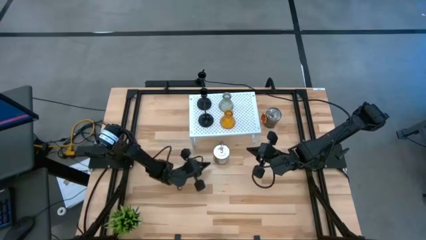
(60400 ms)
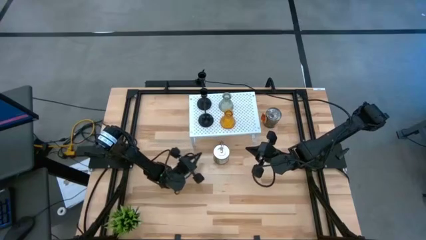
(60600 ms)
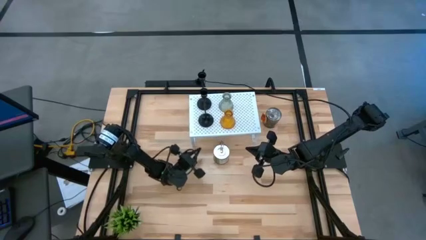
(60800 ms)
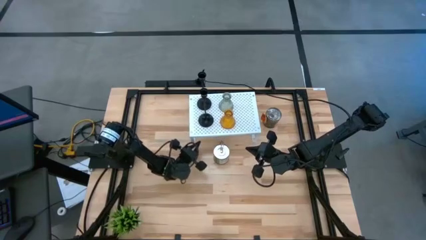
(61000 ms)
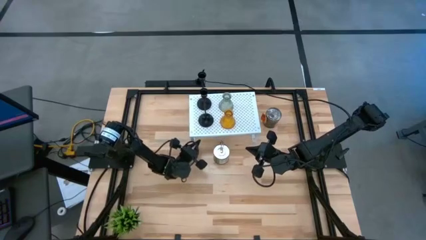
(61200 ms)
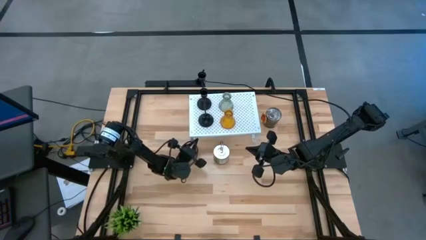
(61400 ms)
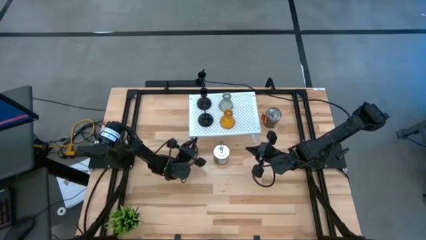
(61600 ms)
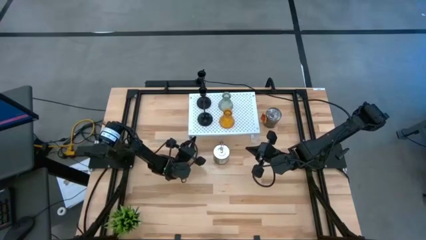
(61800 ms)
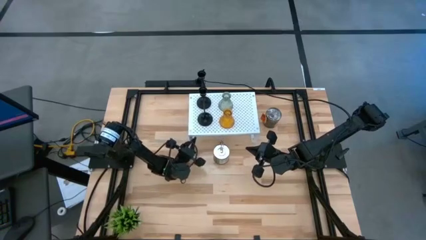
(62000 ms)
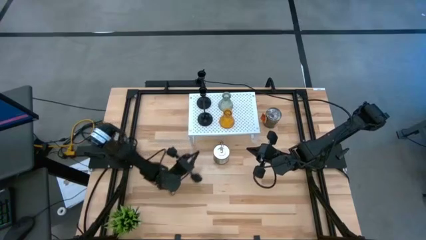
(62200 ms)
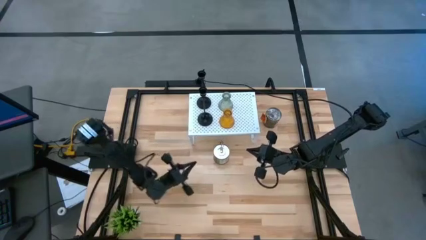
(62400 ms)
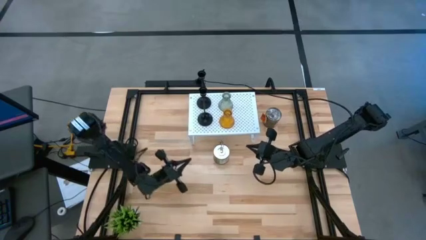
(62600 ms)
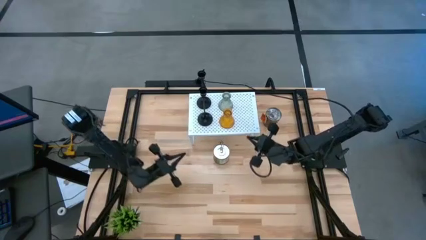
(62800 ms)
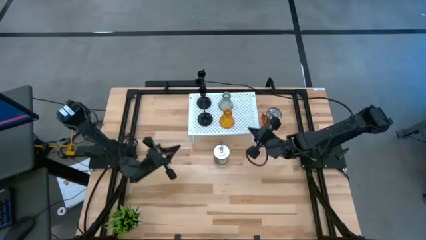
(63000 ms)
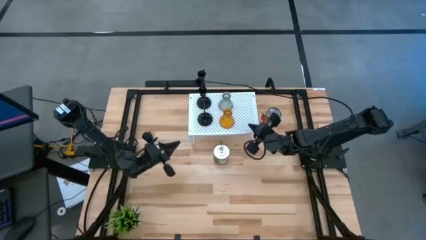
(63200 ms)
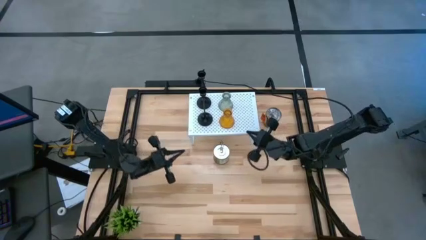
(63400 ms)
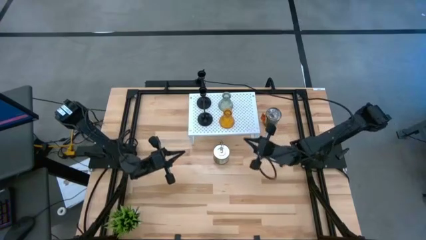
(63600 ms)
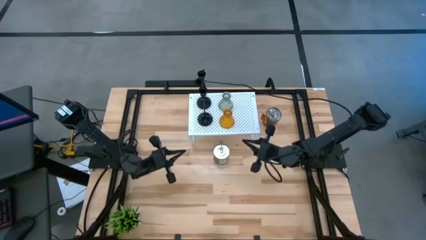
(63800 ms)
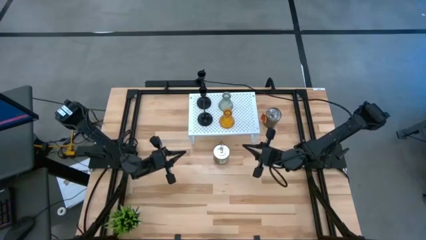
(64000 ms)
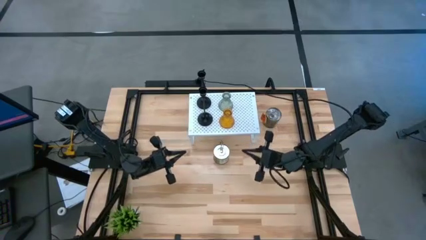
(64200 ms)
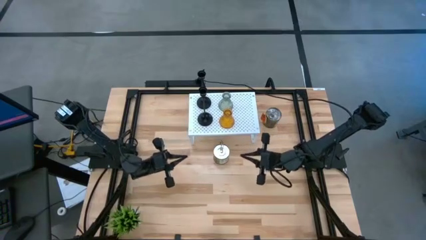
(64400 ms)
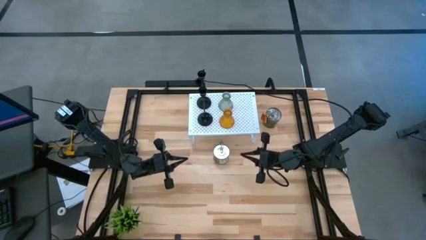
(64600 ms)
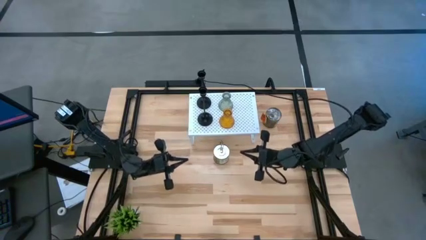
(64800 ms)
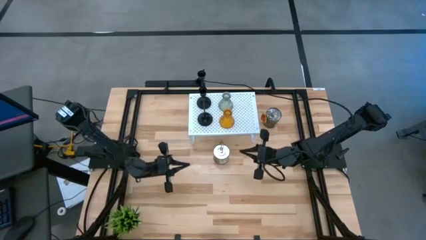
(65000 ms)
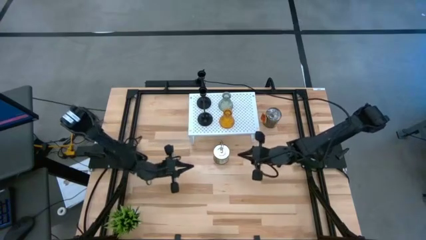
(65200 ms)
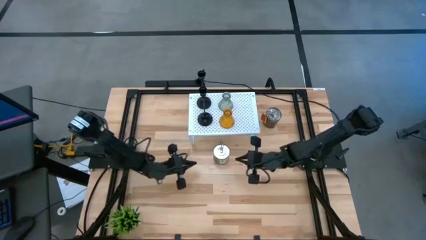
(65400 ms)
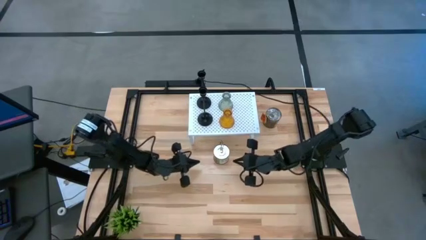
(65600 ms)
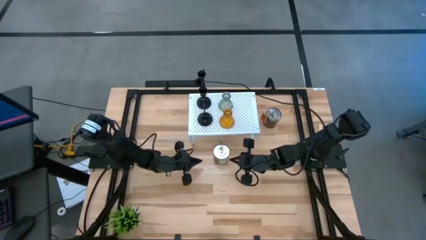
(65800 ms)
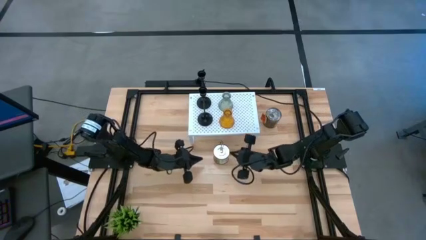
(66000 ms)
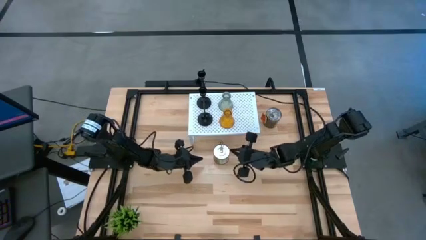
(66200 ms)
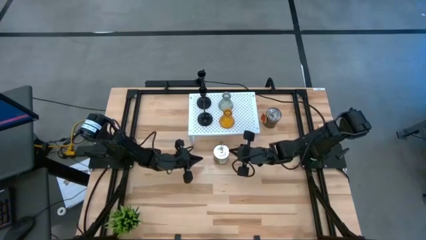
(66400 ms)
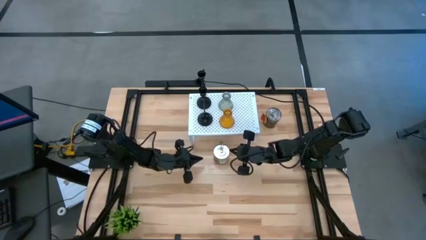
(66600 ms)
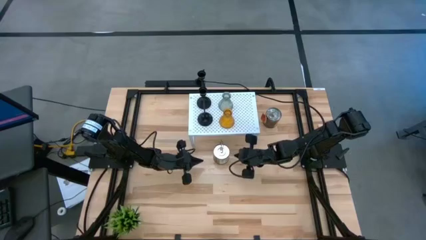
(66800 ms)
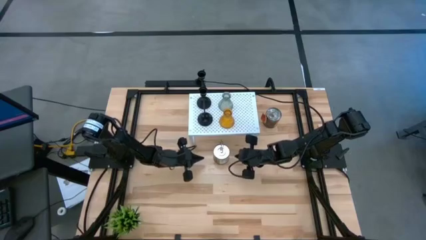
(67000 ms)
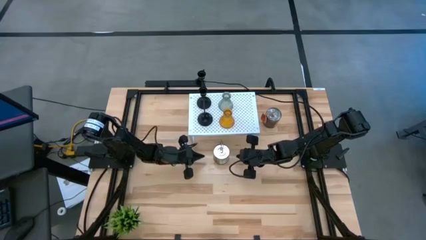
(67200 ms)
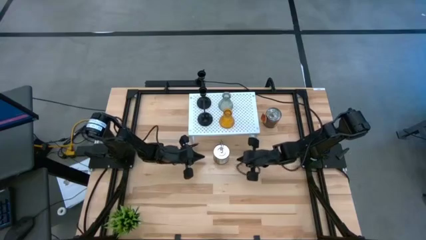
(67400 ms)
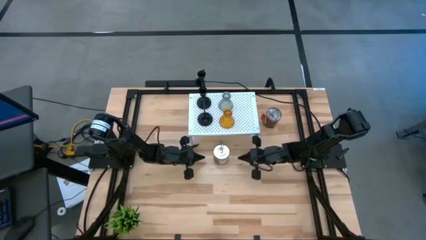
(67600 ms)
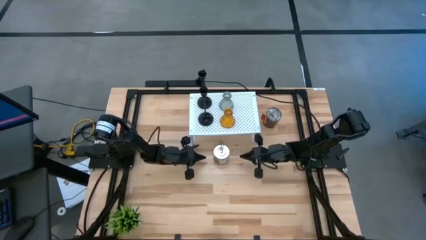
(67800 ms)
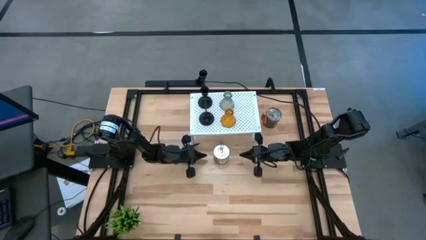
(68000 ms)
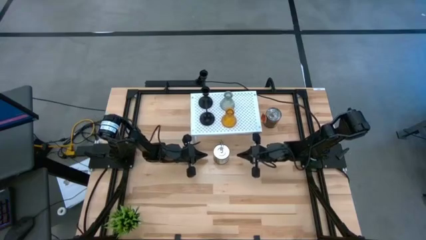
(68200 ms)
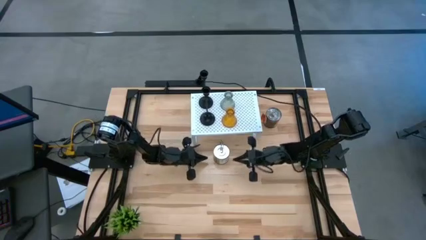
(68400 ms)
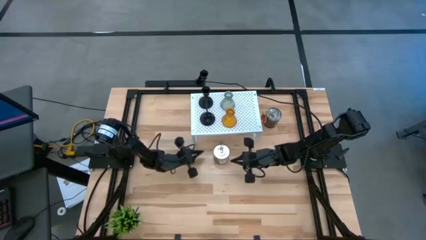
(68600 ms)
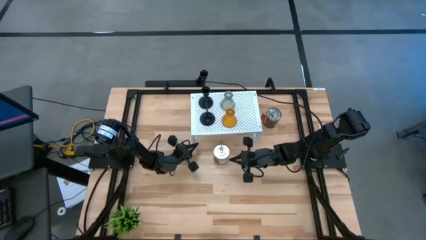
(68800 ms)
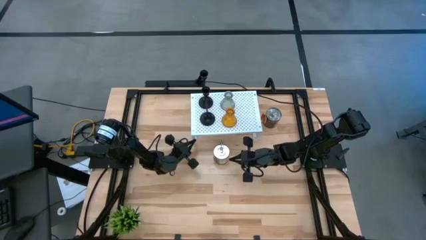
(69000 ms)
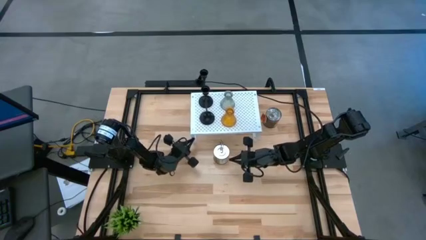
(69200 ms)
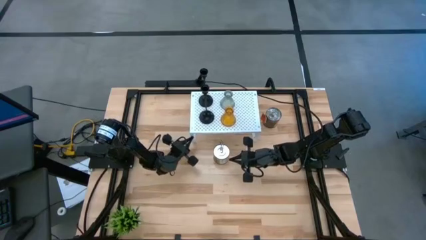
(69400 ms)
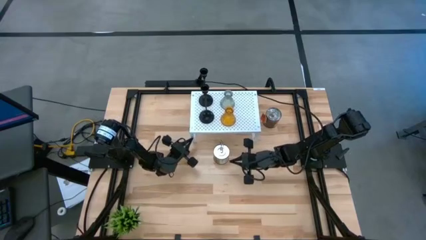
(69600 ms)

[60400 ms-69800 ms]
Task: Pick & Place candle stick holders
Adjust the shelf

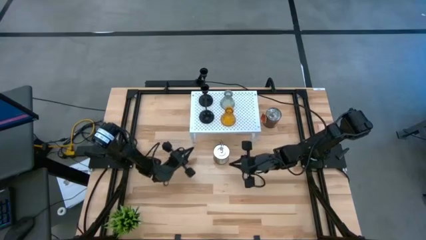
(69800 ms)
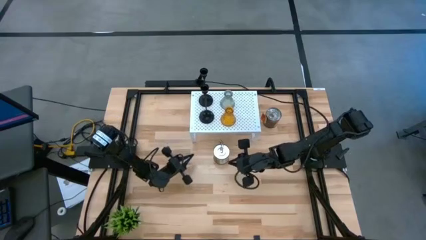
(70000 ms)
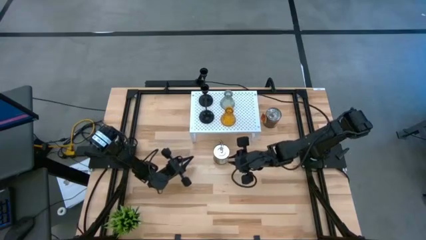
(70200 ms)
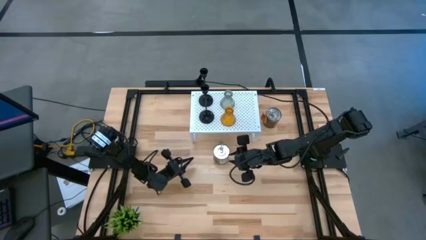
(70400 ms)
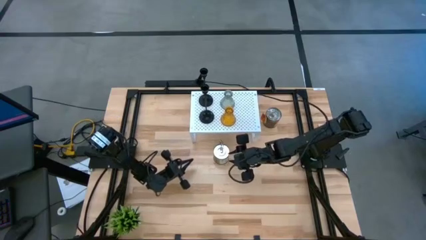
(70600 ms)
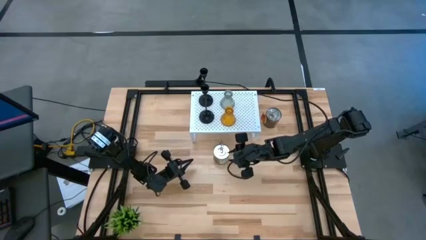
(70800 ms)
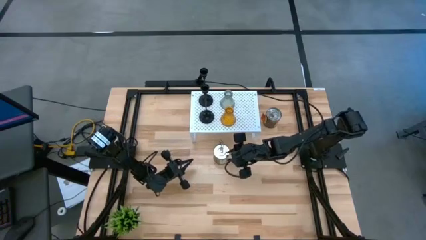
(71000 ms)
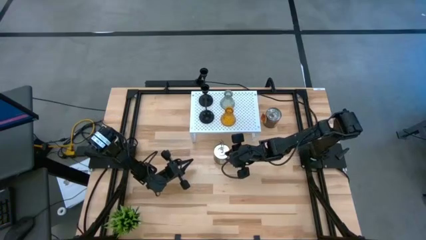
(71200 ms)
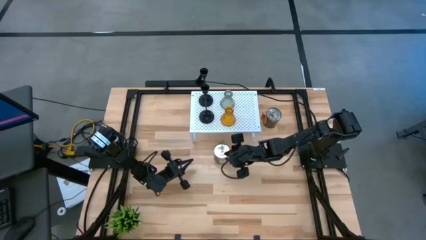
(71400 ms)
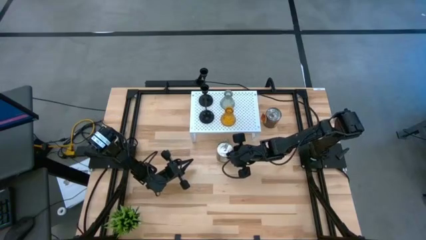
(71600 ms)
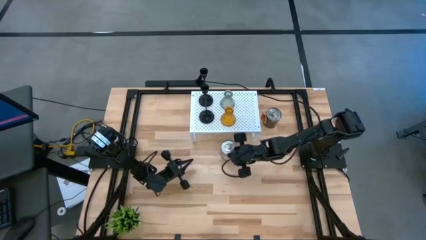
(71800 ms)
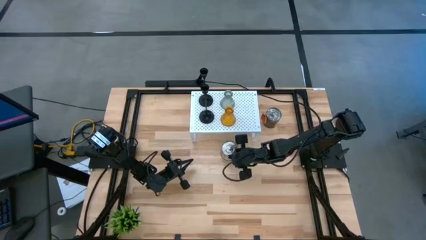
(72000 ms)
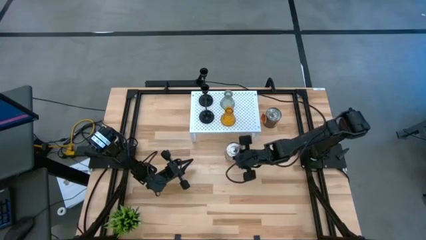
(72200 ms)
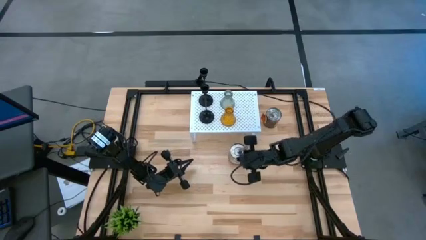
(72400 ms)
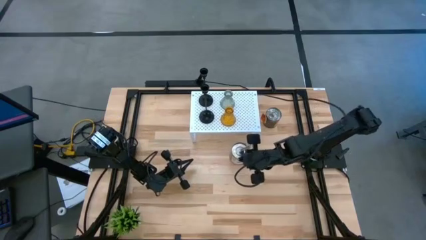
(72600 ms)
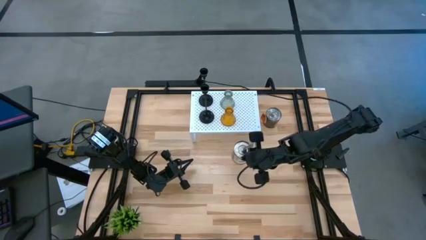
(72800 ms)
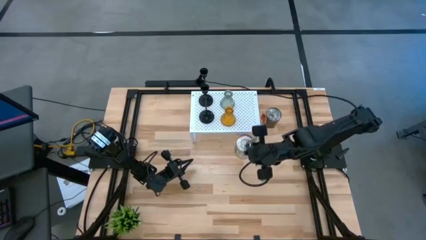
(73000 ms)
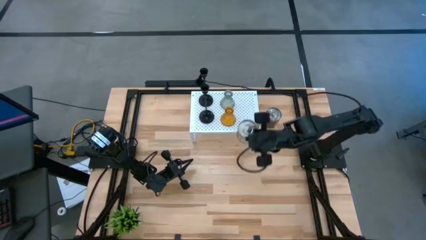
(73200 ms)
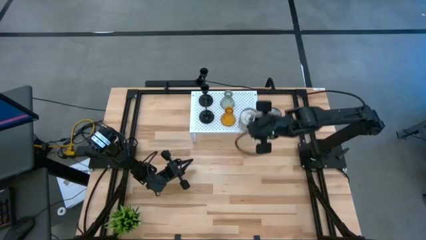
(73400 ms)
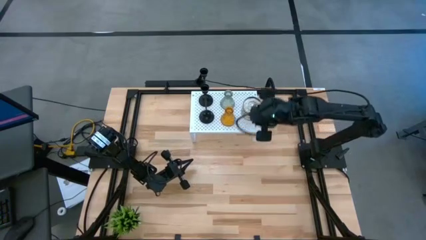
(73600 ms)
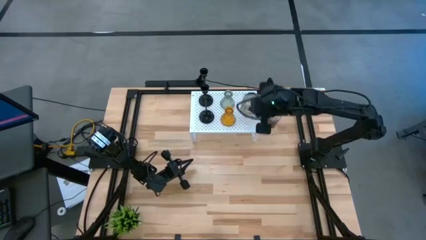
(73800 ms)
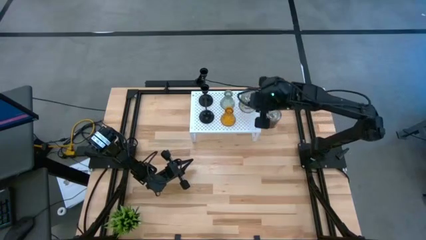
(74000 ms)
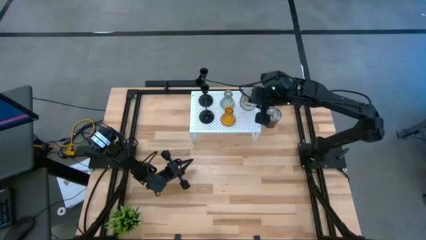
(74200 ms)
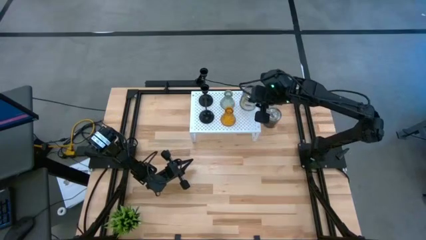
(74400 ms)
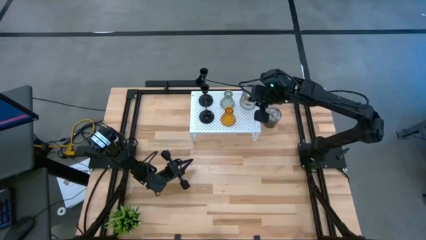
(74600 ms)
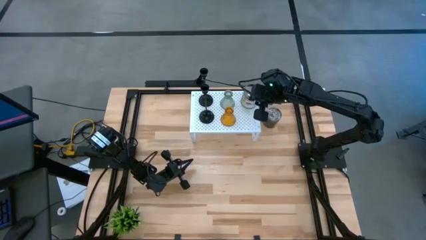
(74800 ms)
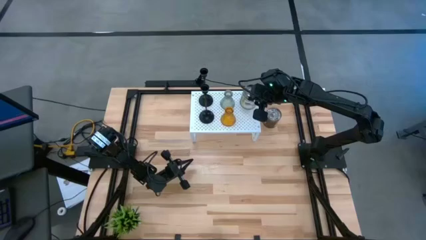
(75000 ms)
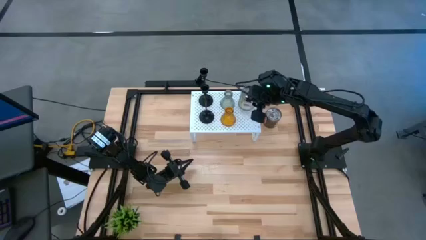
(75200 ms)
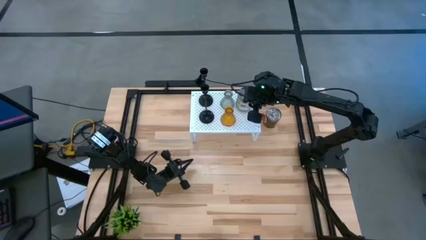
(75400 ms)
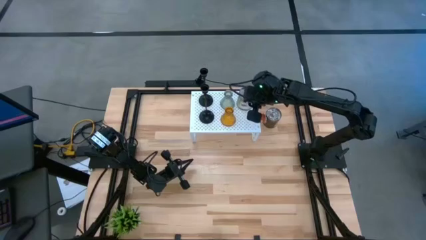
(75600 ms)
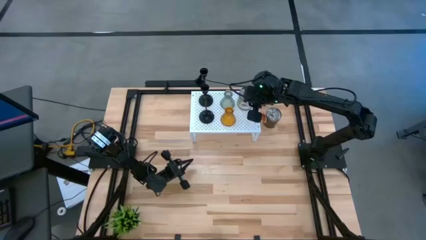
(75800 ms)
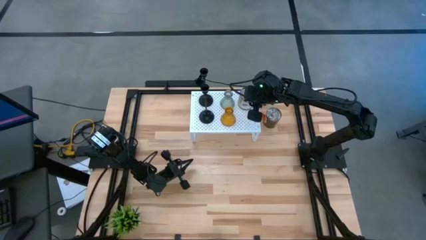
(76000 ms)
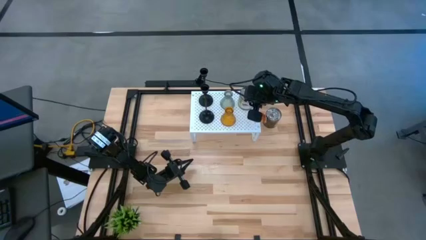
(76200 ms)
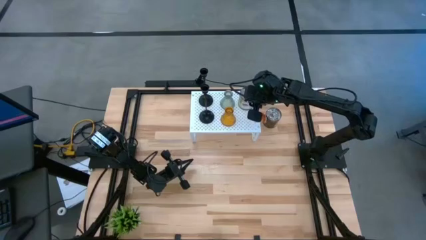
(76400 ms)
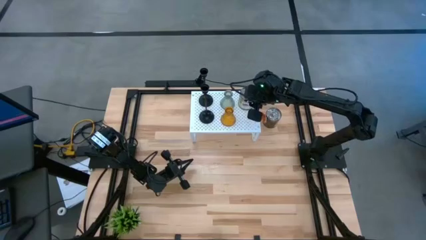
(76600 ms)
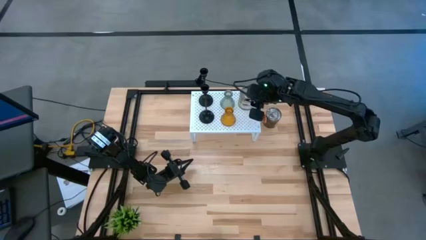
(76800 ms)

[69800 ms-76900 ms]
Put the left scented candle on the shelf
